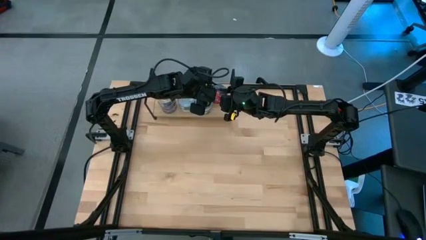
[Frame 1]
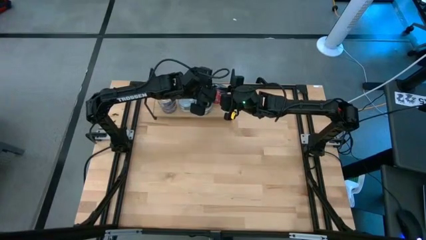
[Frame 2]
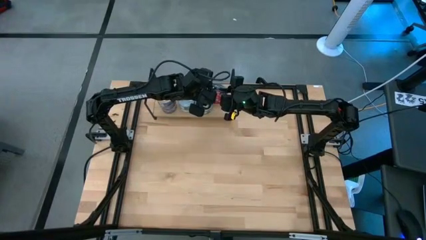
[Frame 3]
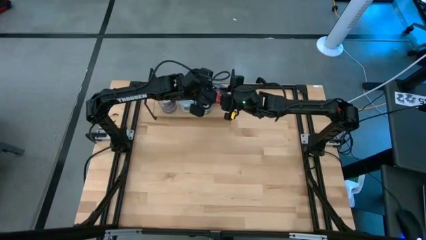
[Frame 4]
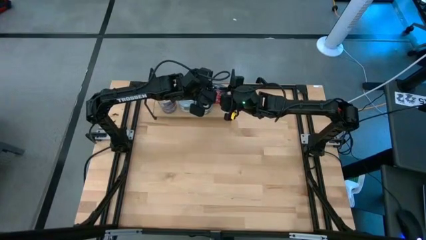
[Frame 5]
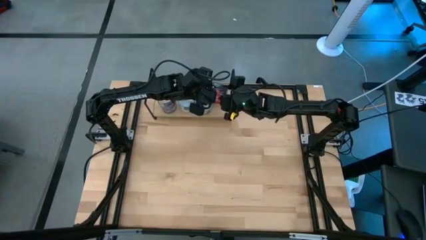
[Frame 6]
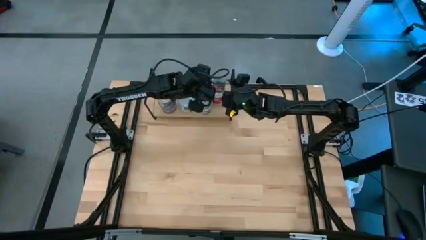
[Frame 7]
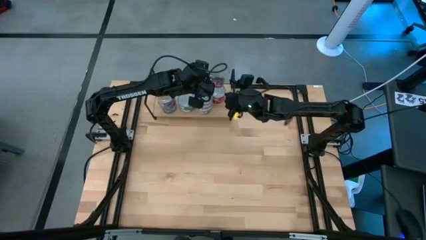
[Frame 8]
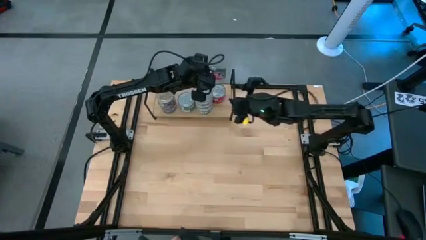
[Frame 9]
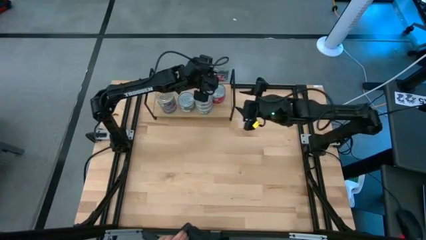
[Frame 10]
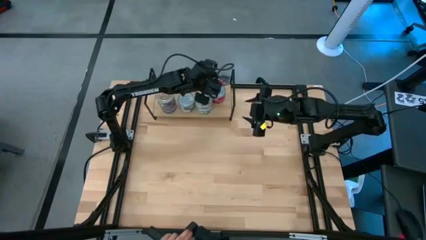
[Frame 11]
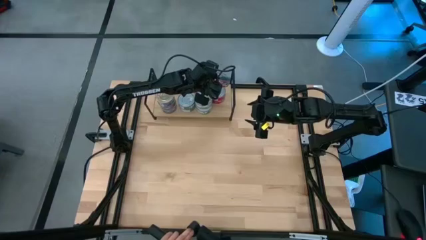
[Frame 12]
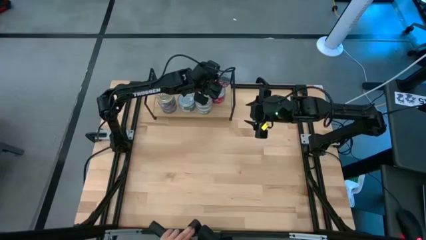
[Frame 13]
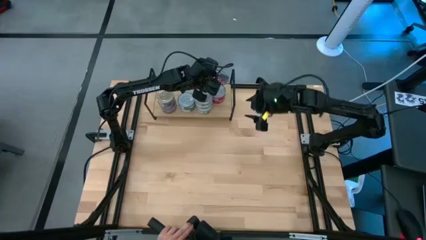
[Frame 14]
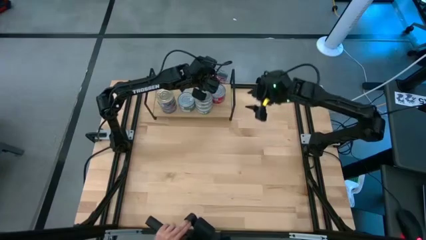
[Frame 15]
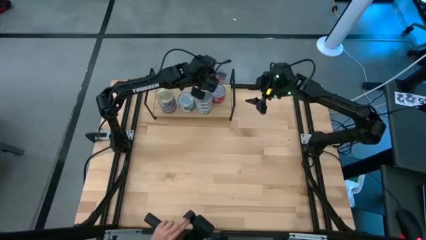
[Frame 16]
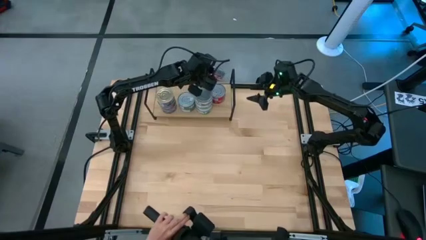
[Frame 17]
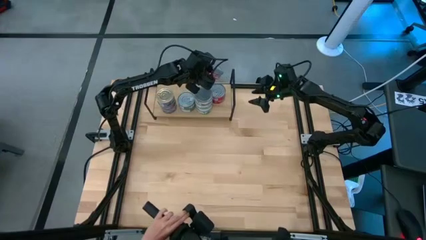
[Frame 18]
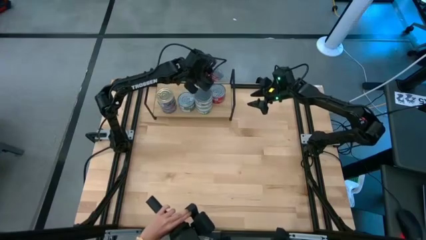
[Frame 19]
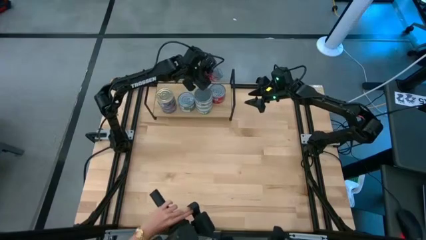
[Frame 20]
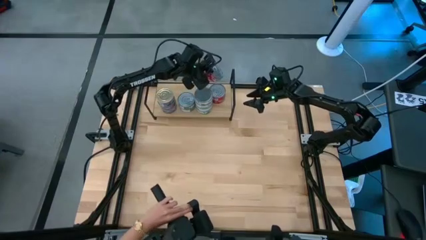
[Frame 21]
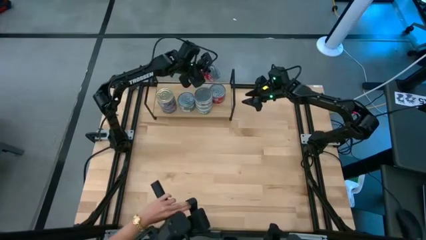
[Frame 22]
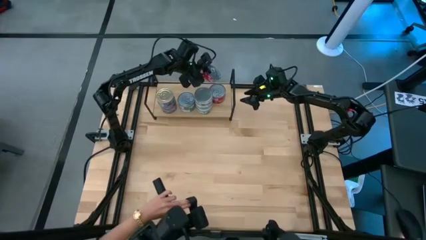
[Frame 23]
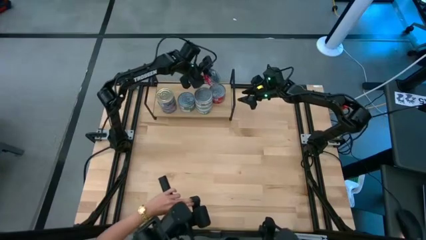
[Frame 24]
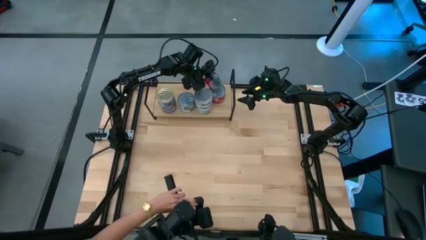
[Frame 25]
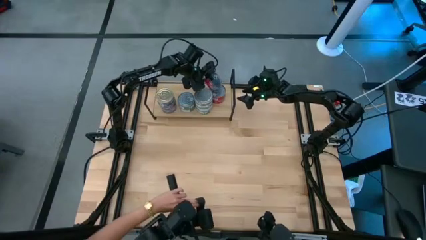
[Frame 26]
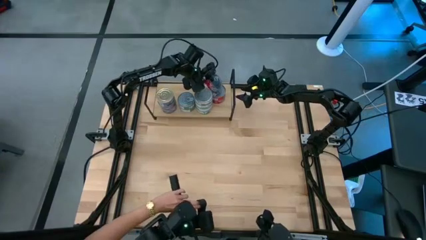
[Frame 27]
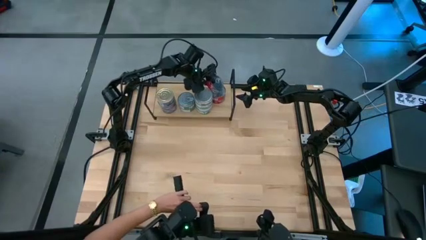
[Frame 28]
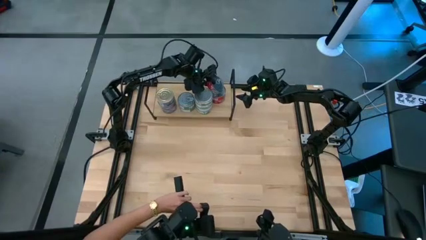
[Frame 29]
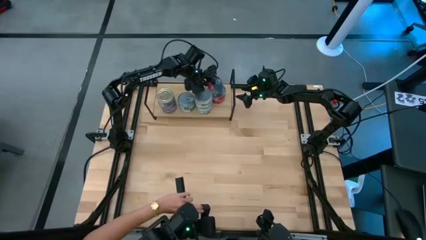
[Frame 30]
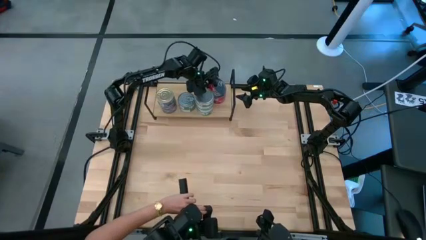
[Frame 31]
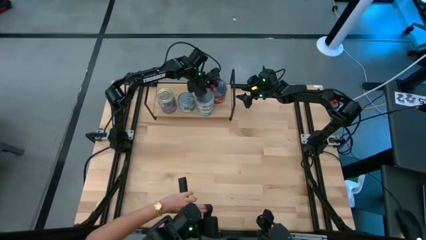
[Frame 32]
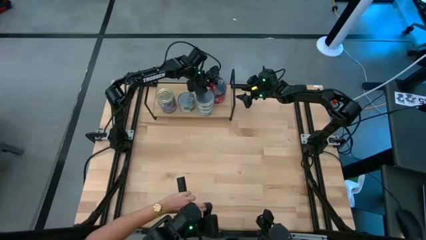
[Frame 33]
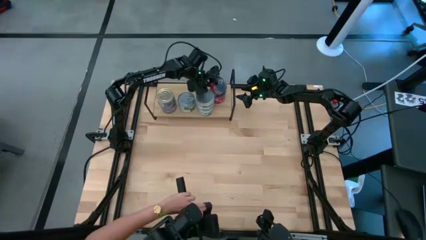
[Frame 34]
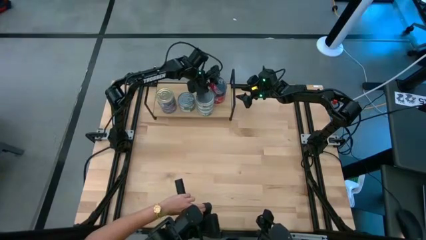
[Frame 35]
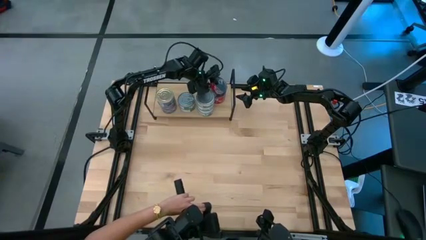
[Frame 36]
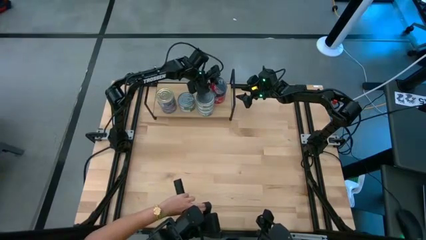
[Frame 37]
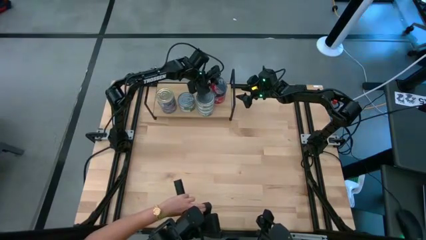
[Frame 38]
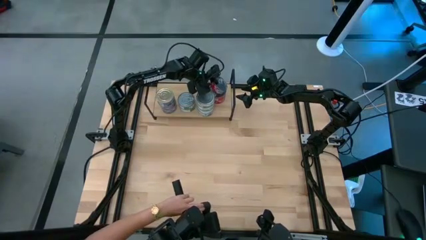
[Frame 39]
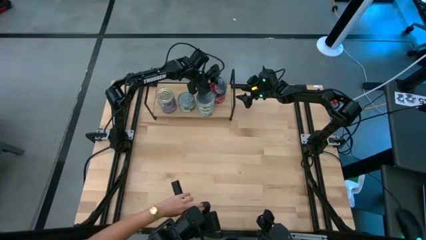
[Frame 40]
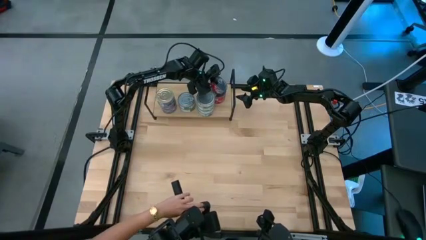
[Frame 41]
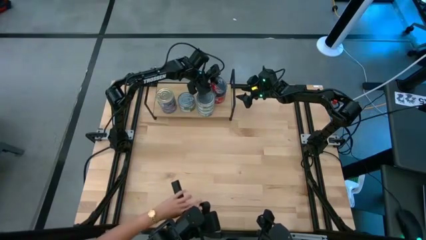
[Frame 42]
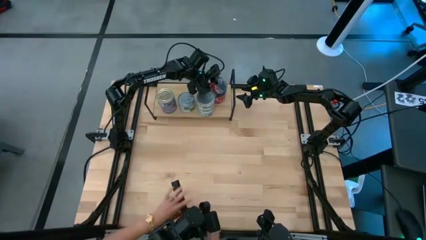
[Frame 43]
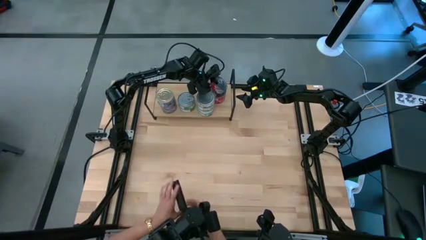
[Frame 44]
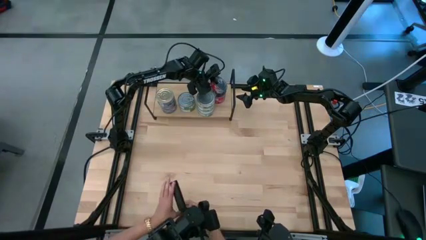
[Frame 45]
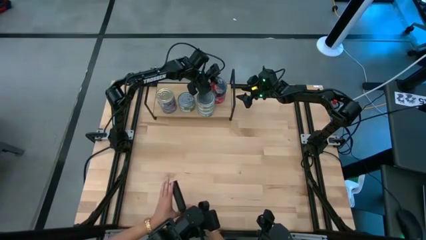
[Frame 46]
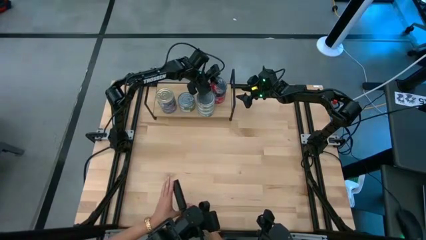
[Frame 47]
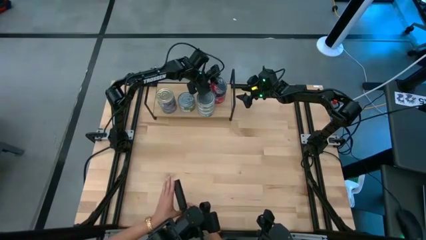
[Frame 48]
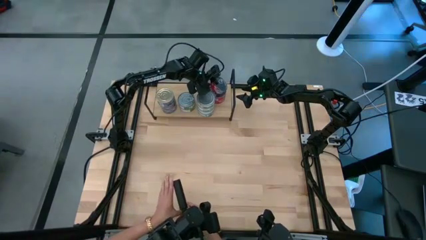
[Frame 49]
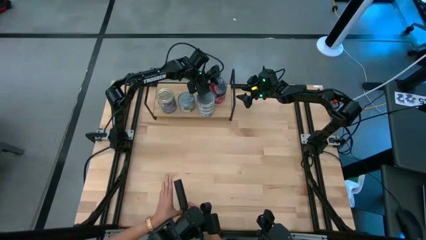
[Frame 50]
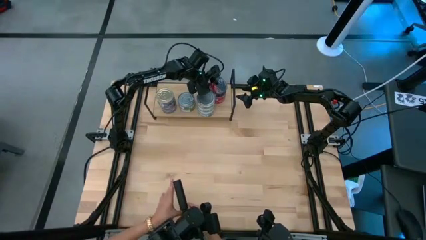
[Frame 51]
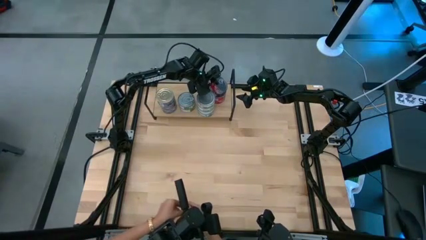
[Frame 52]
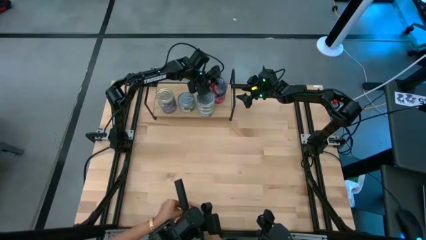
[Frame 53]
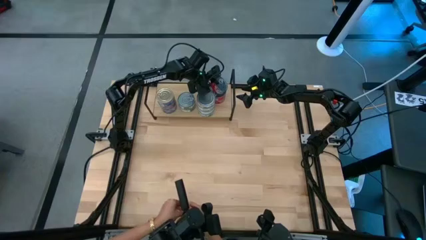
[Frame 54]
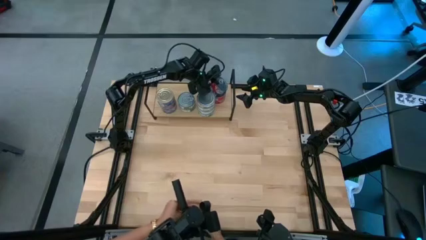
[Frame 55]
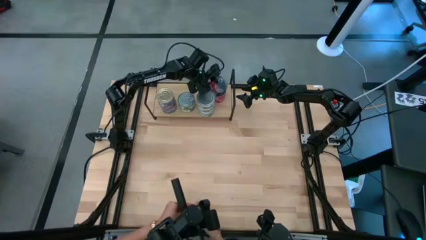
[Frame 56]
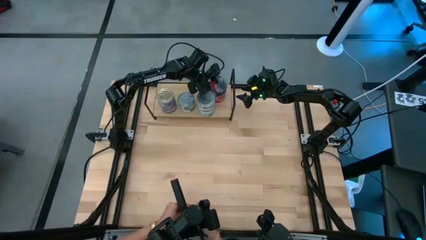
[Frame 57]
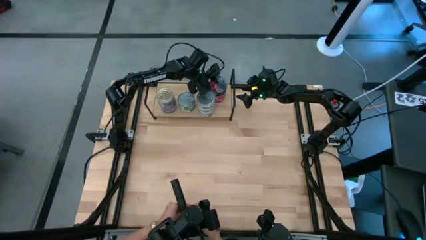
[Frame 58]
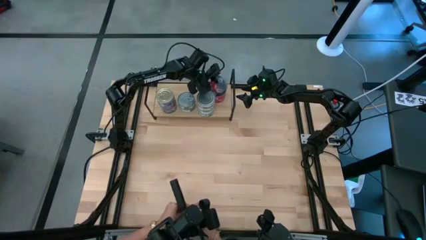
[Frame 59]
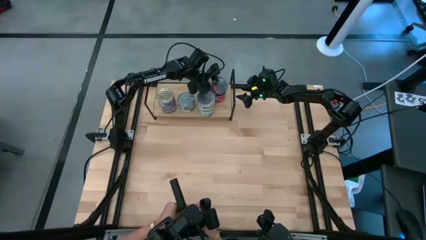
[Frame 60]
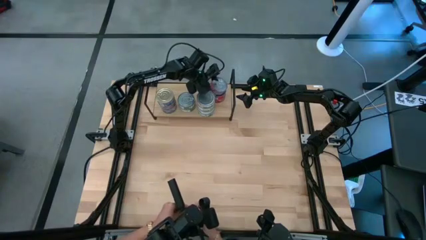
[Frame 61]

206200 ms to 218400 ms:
Task: Stack canned seafood by type on shelf
Stack the red tuna can on top of the other red tuna can on the shelf

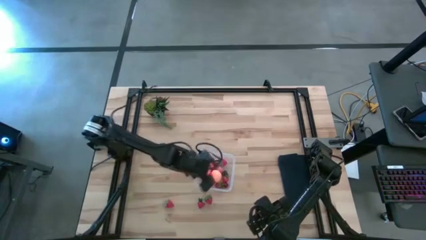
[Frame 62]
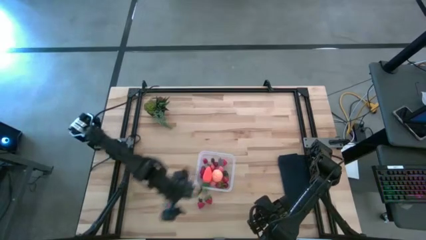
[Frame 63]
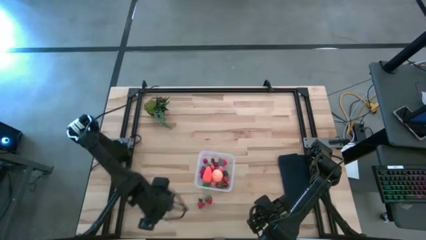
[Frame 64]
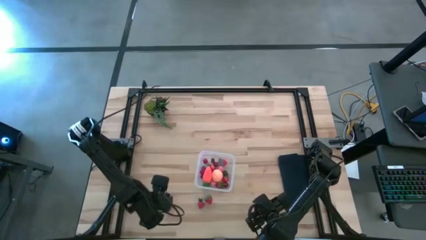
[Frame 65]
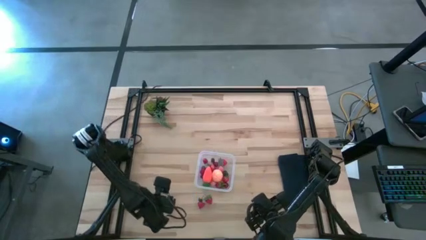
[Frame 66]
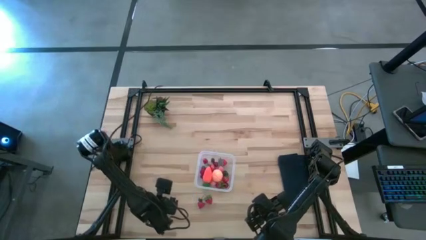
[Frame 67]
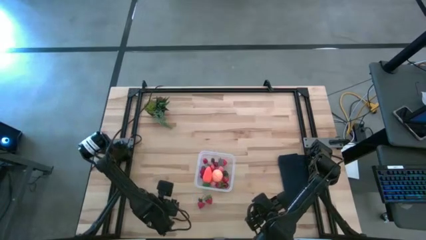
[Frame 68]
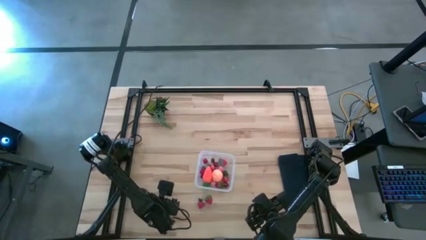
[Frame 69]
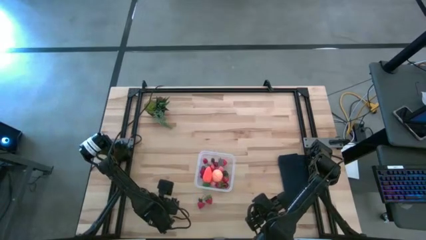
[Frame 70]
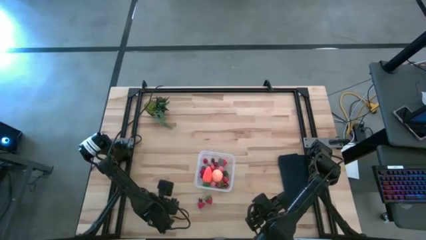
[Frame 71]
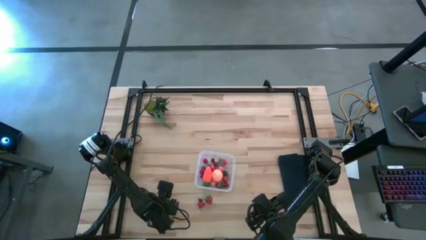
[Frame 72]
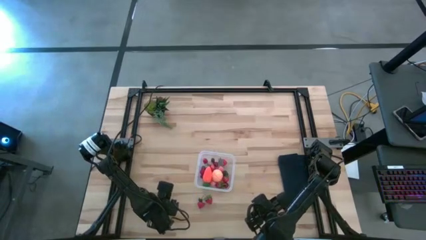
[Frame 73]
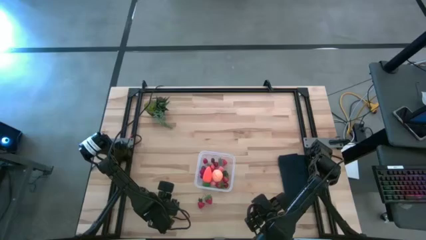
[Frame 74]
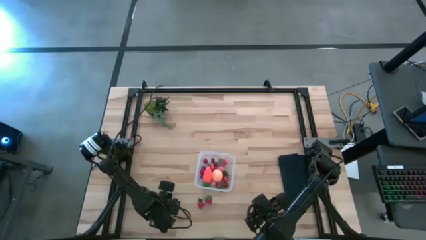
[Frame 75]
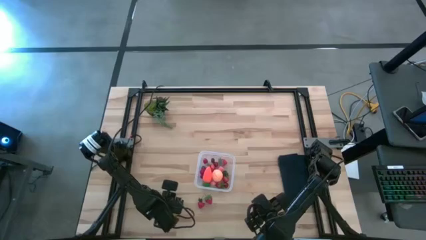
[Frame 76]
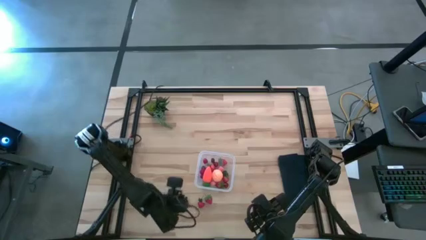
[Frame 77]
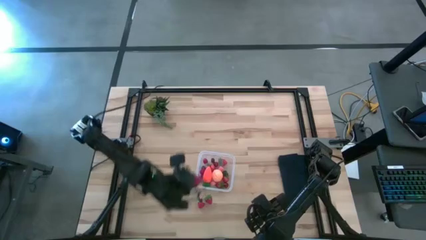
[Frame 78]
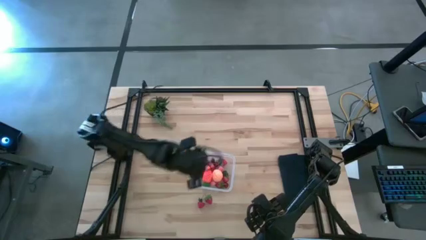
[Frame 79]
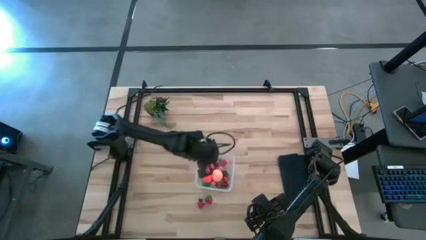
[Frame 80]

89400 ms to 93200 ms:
Task: Pick and placing Produce into tupperware
Put the strawberry into the transparent container

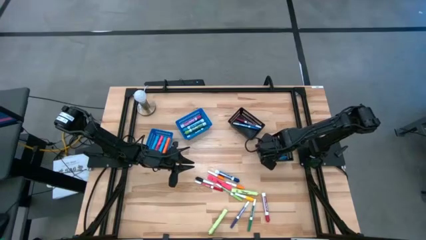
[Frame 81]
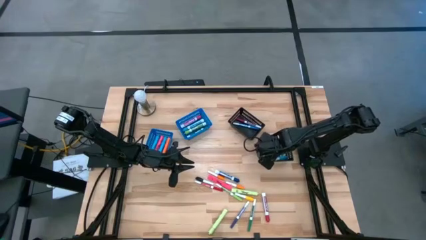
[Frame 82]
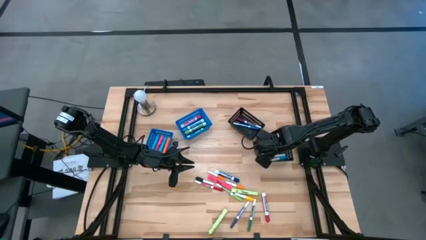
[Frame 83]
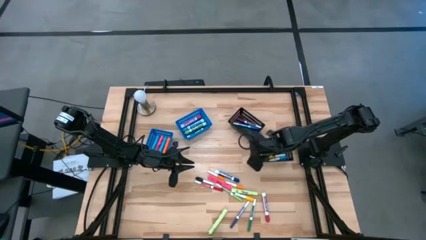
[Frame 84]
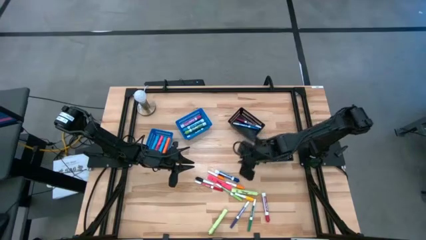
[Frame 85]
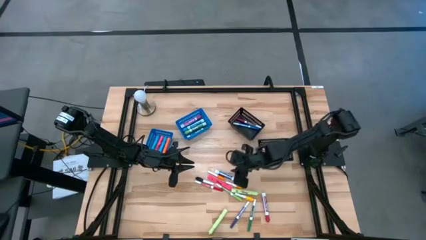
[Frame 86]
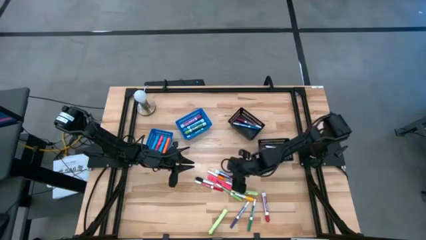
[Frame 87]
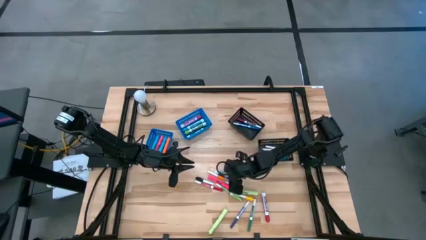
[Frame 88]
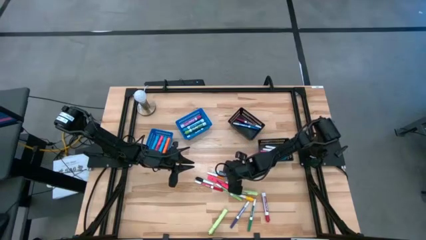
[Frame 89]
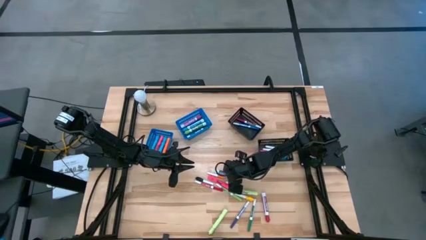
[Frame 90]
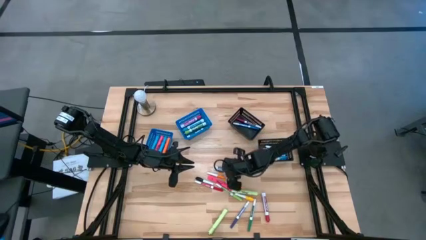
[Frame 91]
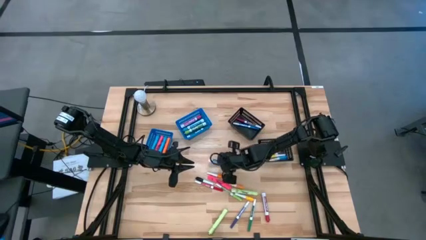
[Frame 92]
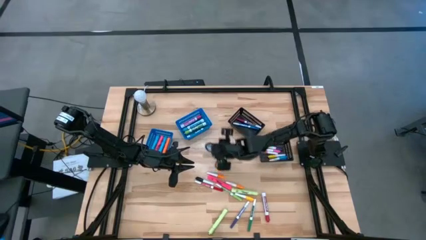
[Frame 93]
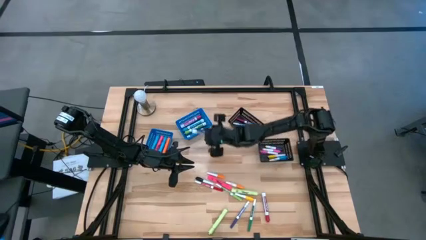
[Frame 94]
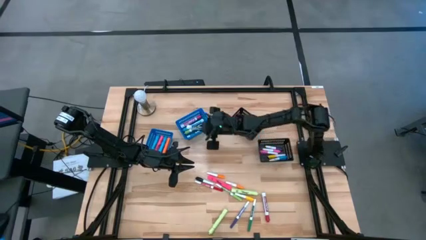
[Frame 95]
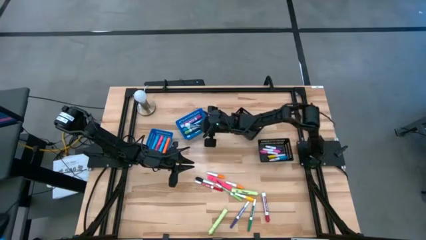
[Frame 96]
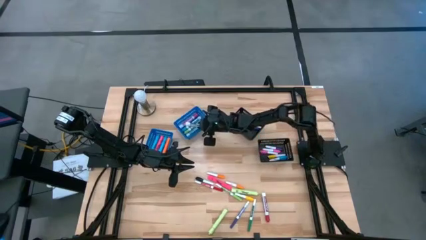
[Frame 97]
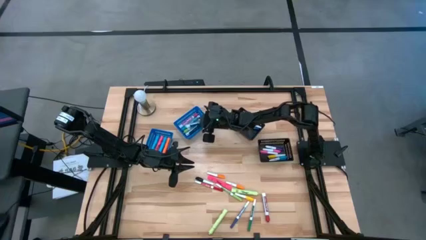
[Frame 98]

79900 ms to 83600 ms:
Task: Pick & Place Markers
Put the blue marker pen into the right blue bin
